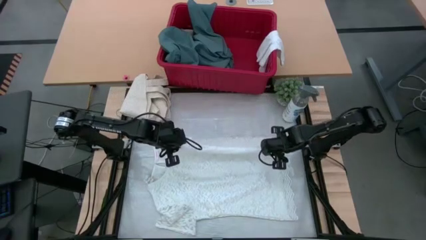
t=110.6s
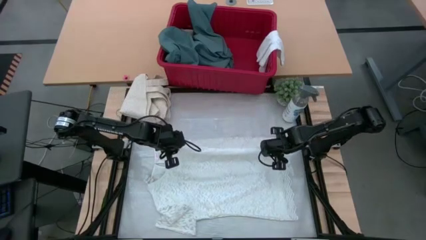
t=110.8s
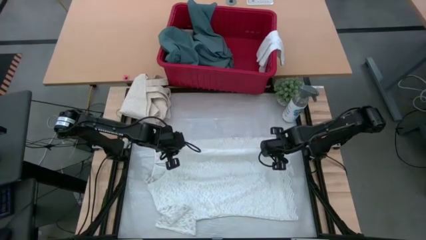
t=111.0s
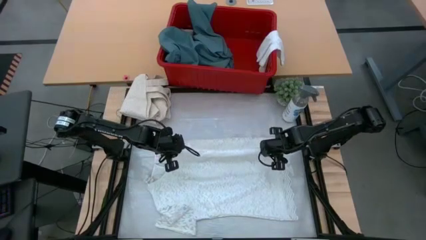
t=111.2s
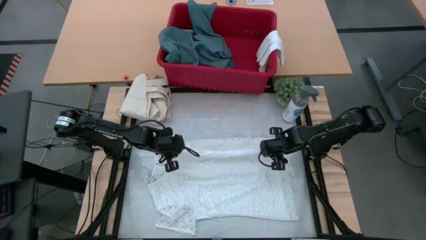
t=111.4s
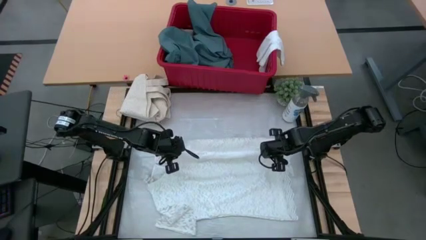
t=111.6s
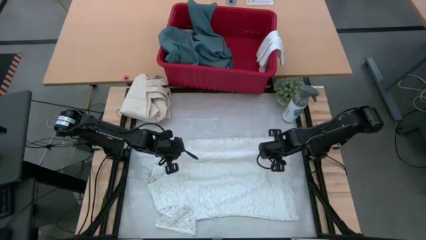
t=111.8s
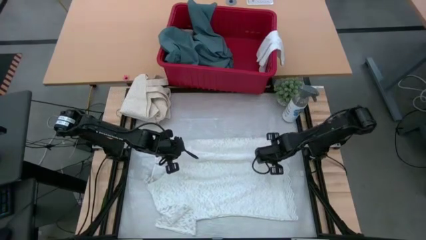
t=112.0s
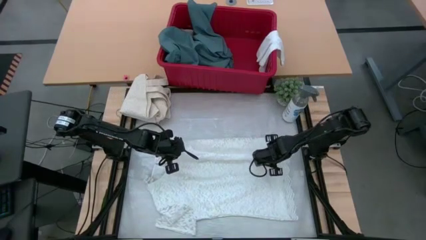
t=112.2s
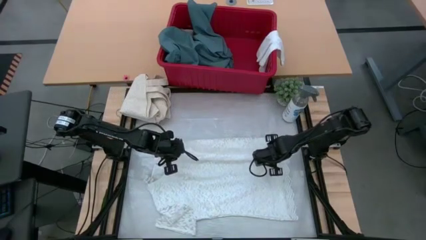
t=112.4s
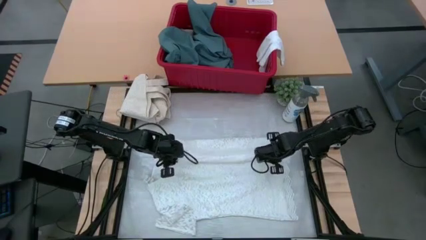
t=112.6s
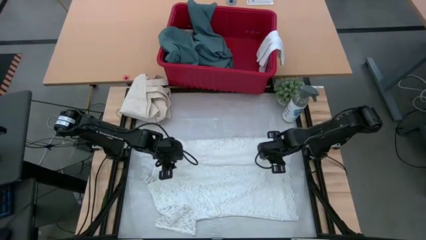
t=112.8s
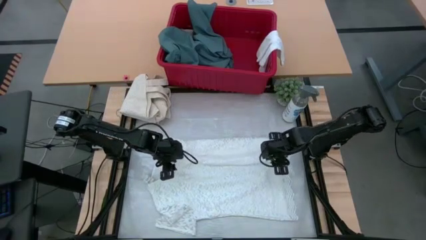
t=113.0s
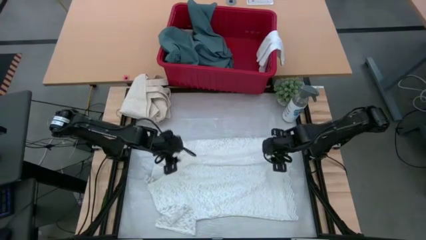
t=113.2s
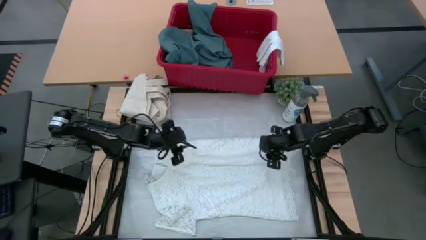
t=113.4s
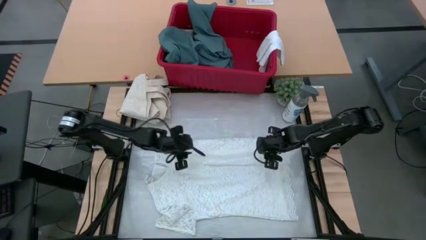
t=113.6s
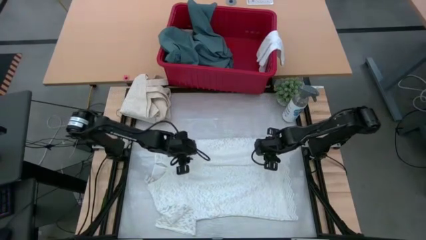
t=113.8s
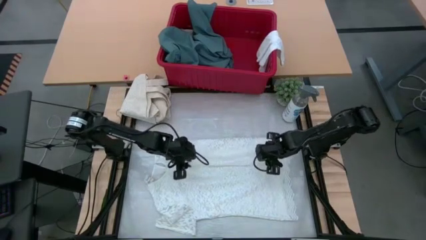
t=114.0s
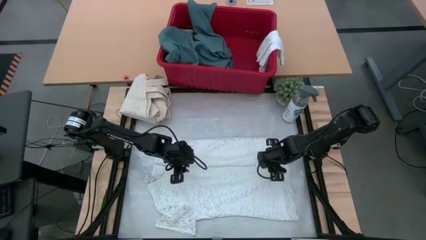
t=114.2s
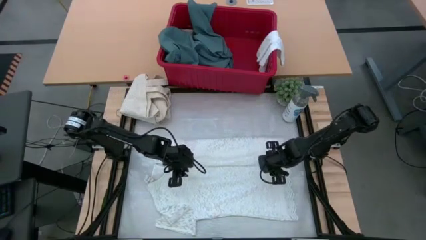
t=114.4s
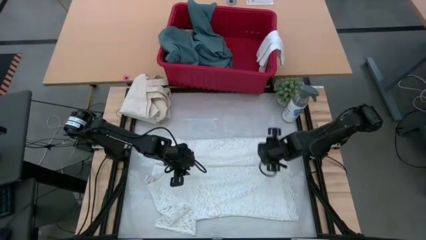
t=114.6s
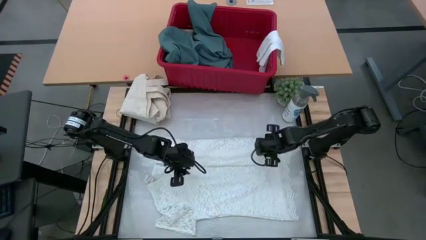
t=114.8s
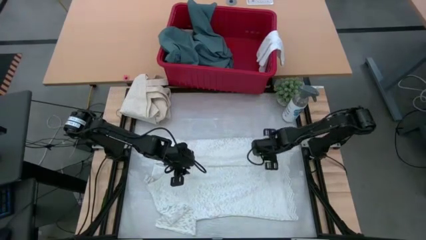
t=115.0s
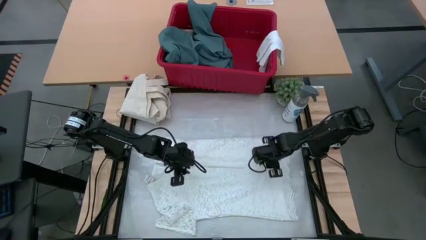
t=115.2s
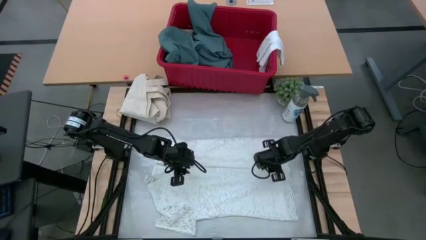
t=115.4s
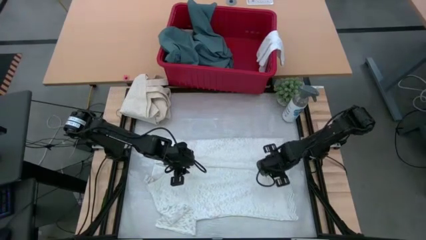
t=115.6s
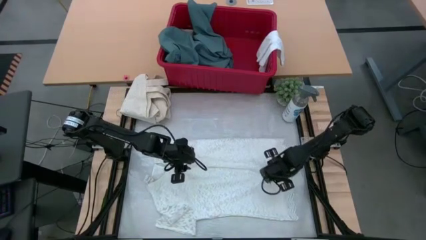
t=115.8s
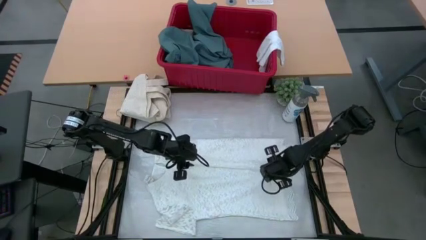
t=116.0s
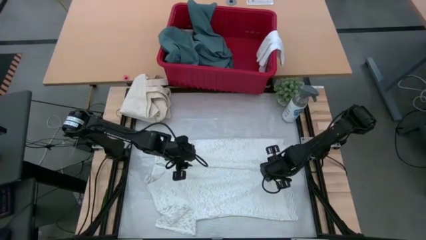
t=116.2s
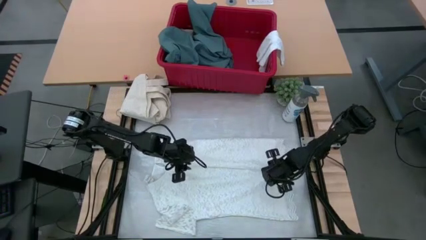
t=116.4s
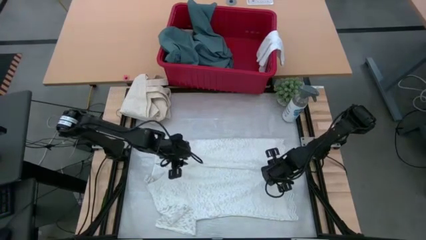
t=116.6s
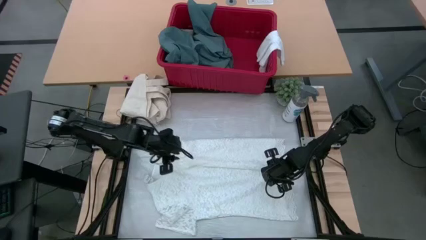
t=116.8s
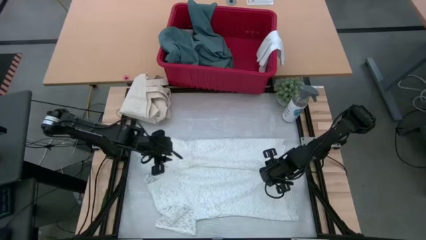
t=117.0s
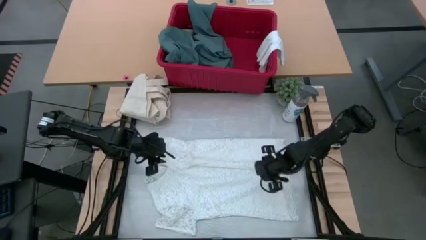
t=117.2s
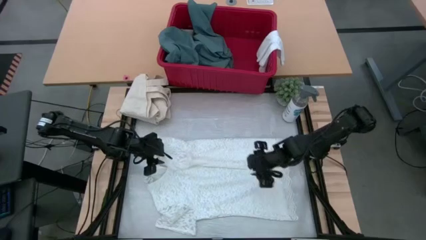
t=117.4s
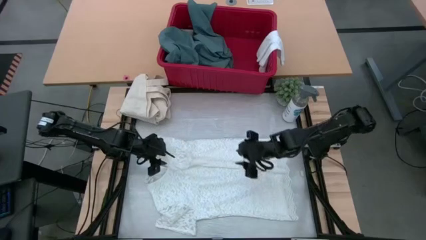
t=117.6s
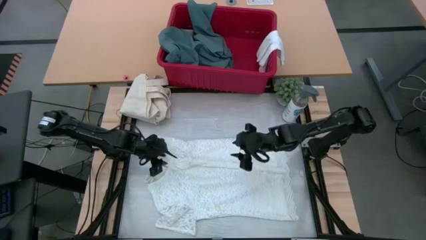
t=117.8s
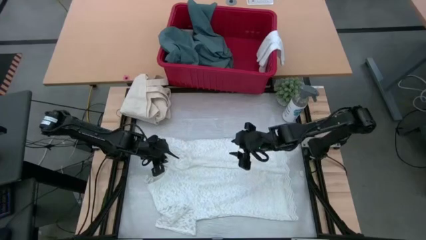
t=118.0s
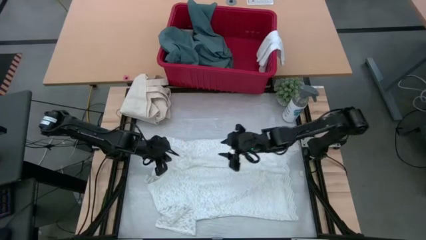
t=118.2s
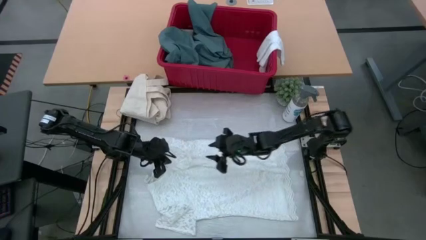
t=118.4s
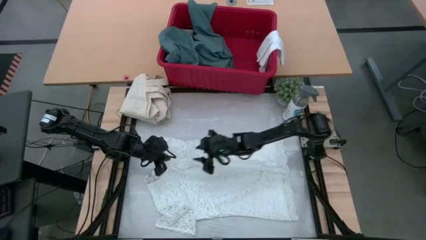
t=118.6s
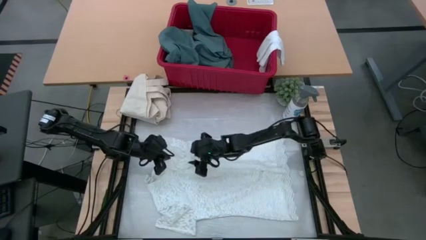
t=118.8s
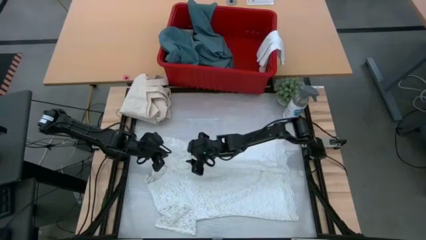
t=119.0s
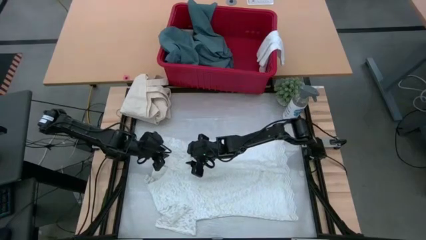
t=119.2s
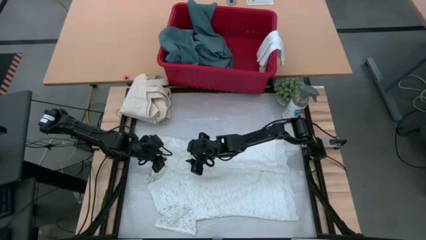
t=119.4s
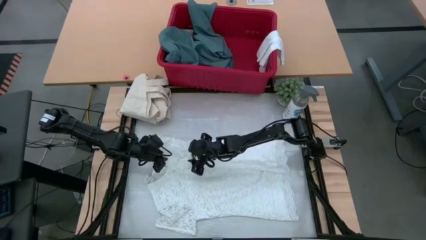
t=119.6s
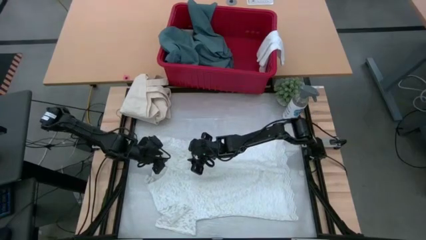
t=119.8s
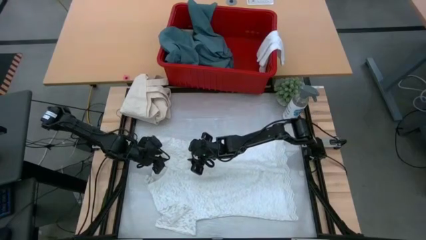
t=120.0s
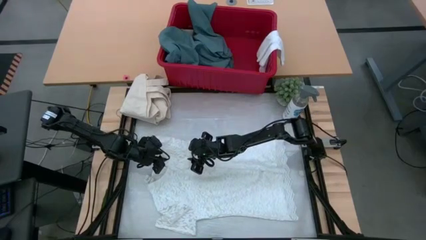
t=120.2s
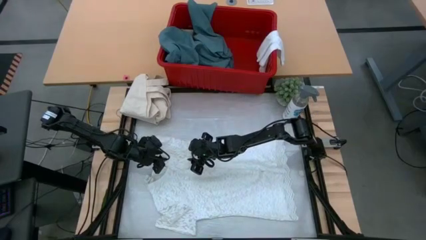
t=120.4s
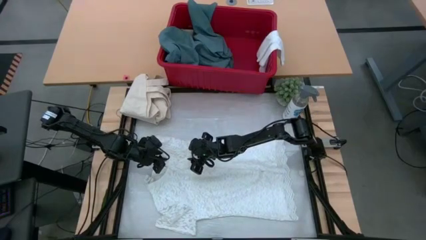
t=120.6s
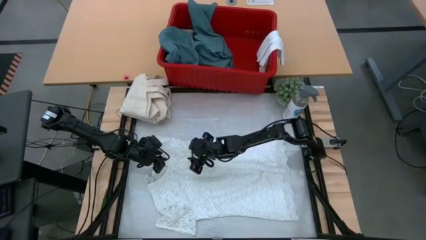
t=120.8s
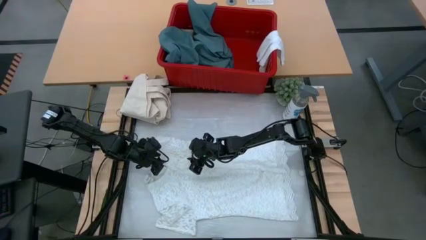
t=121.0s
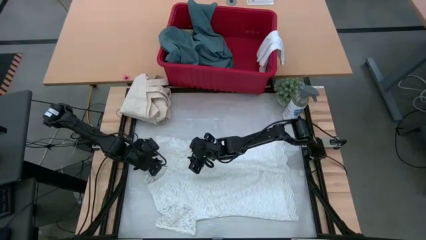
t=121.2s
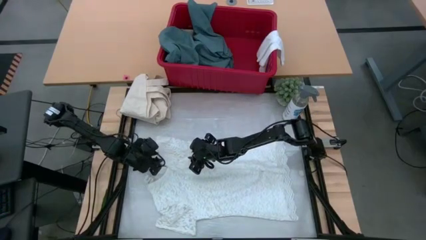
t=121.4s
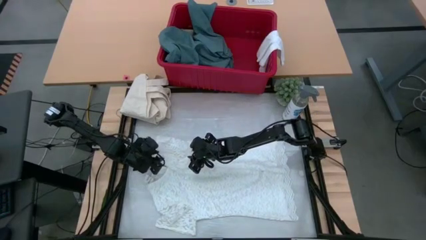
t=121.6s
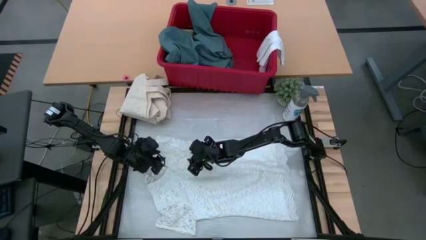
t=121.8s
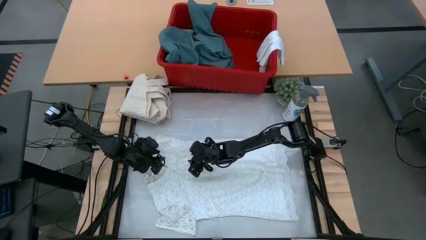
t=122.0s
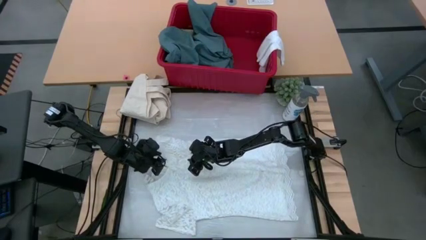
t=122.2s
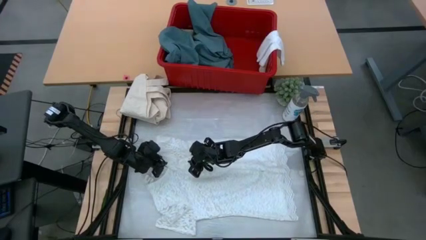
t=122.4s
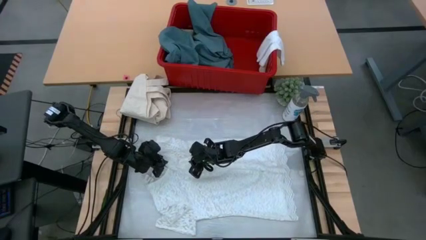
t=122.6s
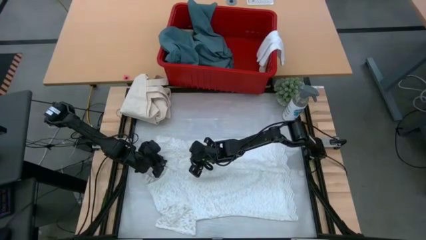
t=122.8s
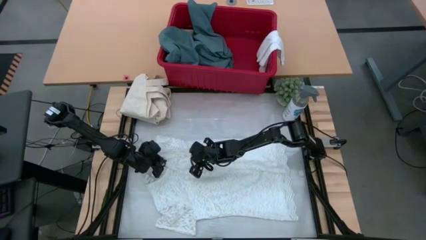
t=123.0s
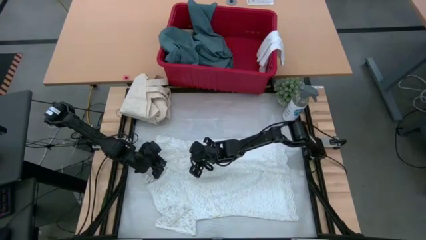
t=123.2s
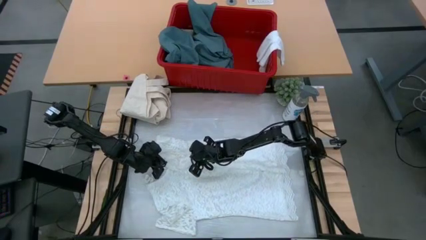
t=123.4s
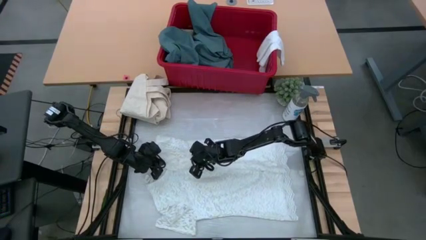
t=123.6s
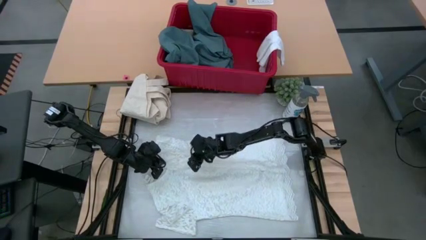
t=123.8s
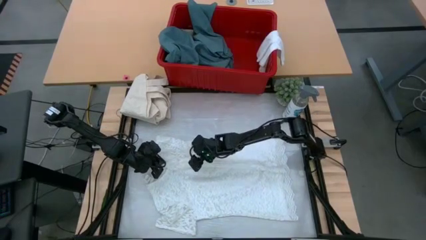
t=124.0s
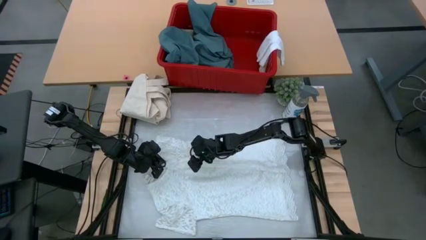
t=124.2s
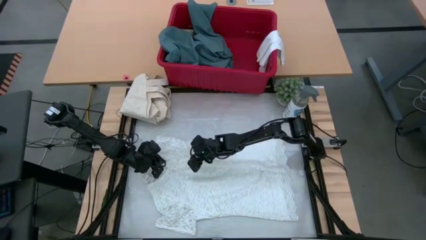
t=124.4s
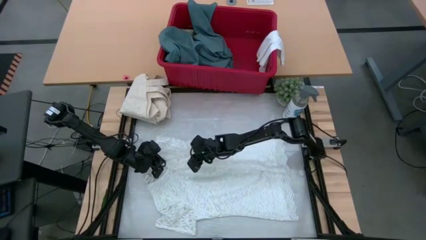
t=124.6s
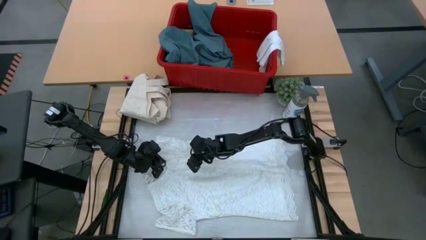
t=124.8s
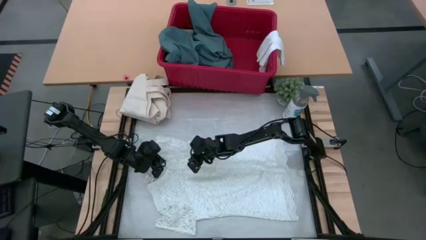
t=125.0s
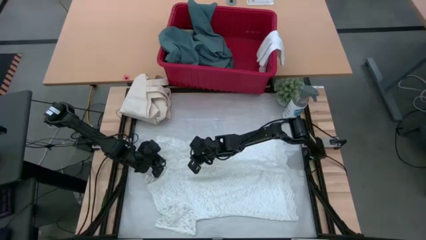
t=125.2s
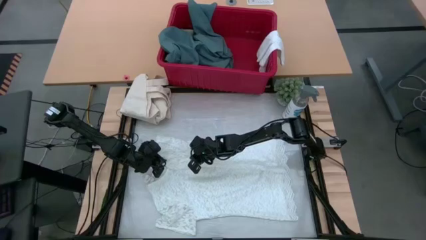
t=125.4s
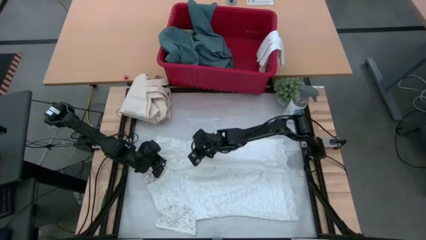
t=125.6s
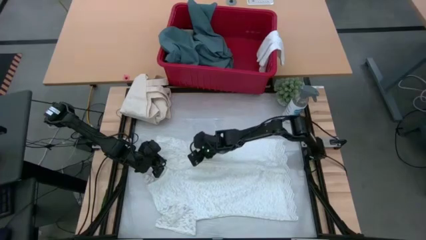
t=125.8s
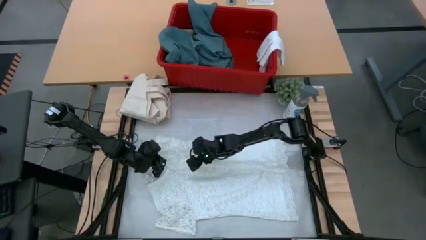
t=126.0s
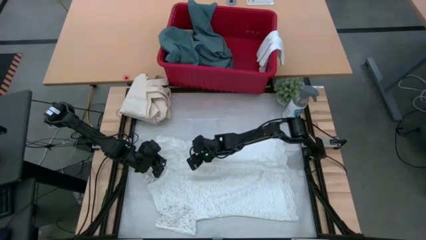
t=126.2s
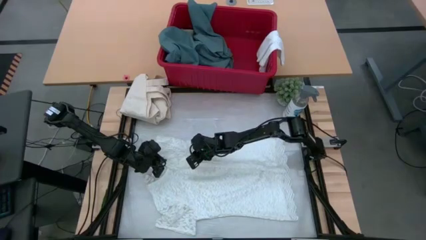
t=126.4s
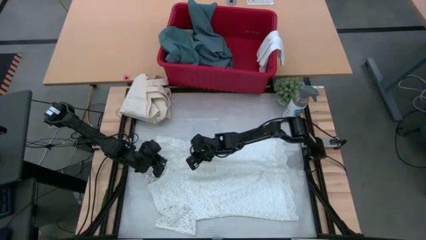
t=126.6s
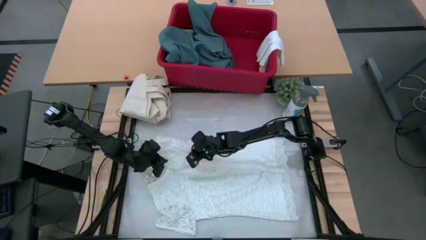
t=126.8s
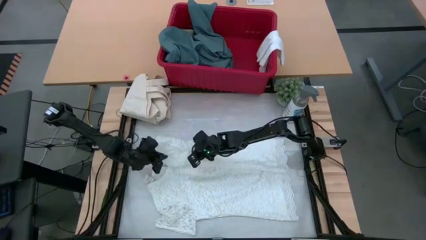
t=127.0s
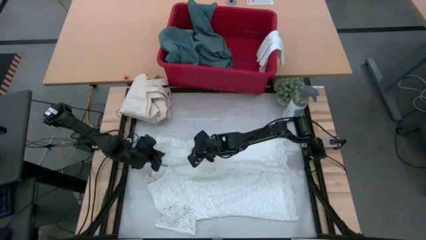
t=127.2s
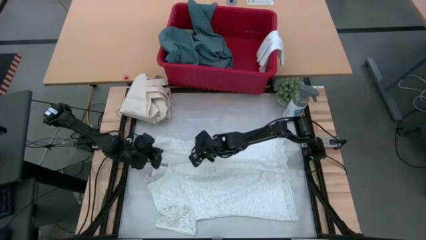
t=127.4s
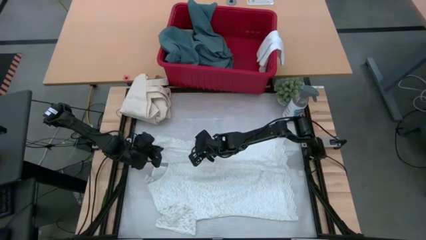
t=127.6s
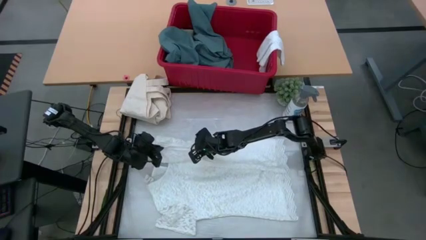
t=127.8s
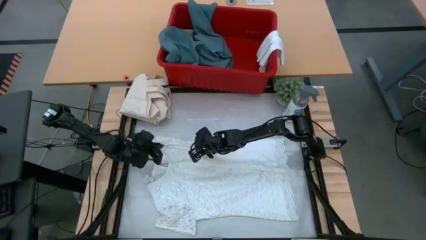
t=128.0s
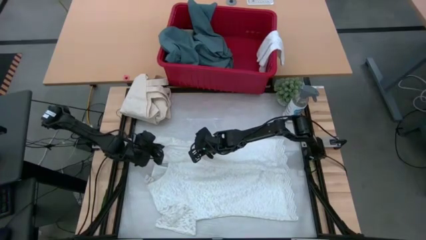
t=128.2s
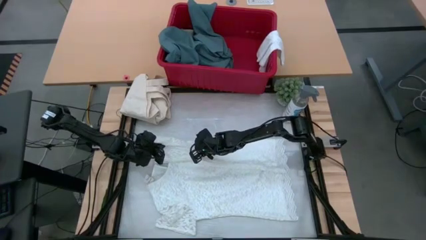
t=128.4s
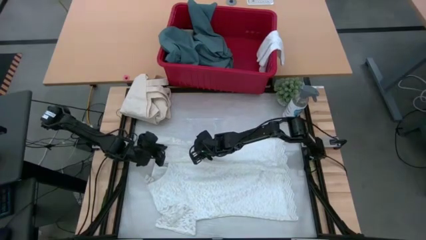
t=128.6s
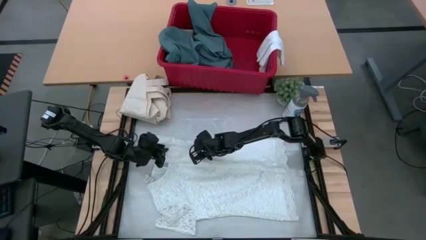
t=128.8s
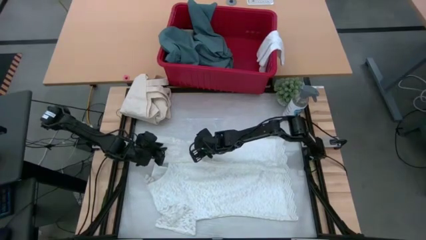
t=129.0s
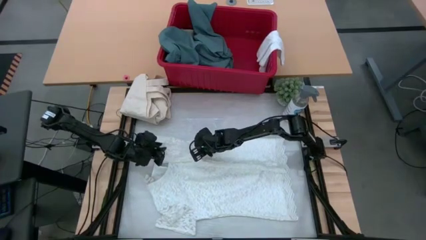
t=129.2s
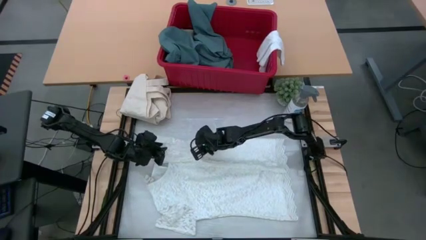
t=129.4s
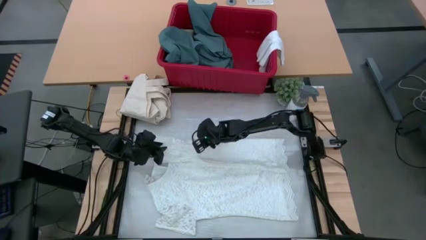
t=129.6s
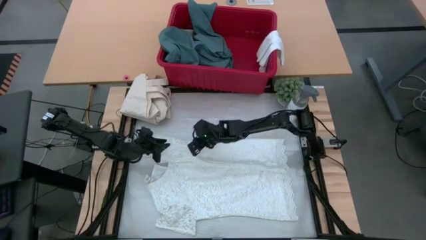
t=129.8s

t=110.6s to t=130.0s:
Task: Fold Laundry from Bin
Fold the white shirt
